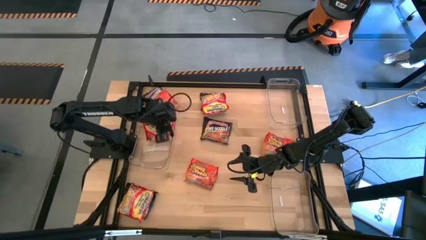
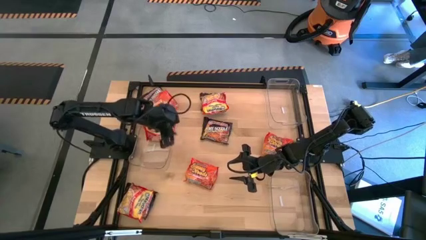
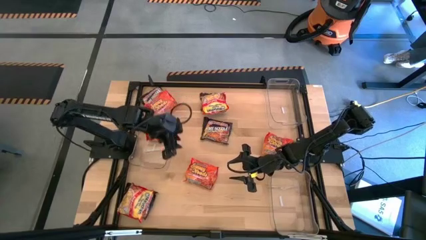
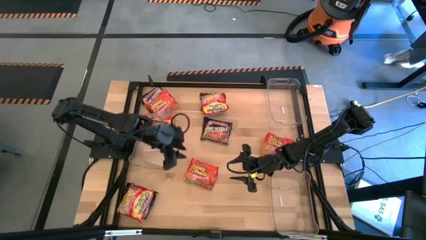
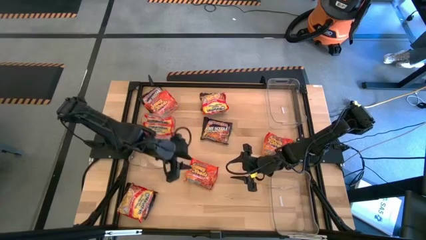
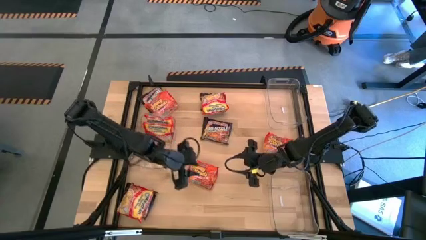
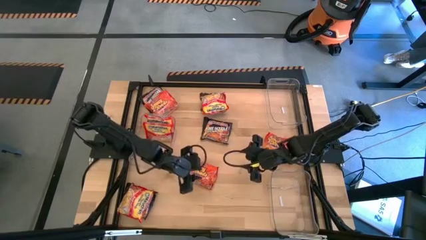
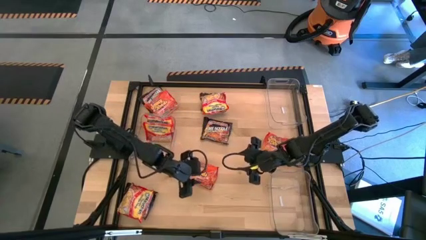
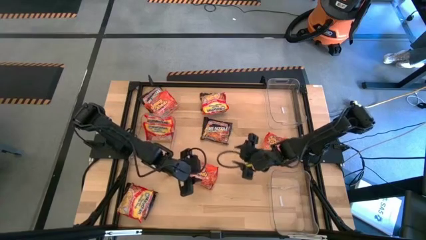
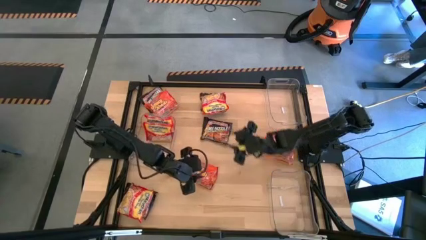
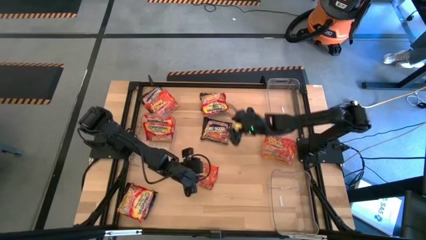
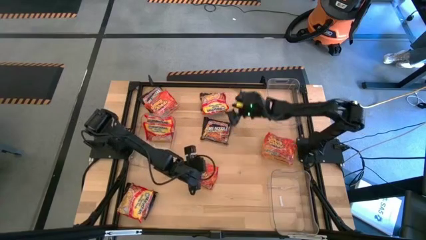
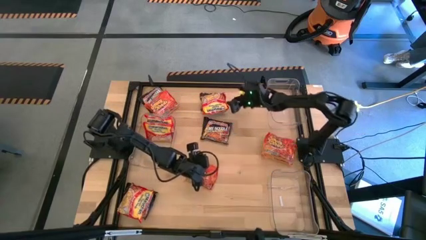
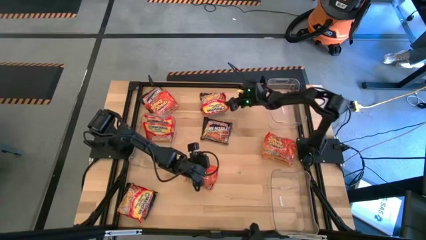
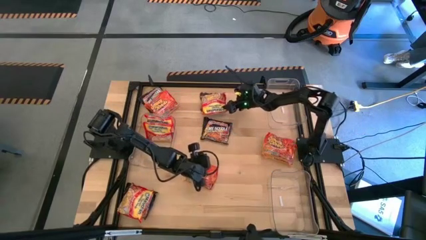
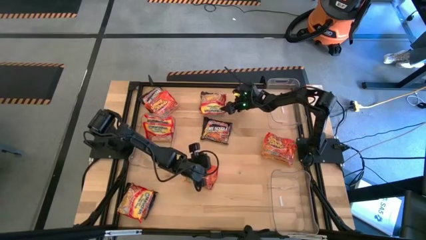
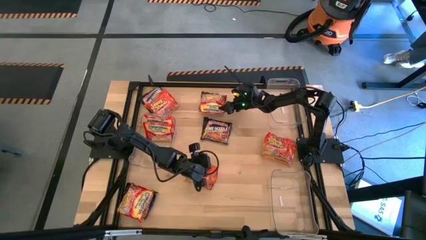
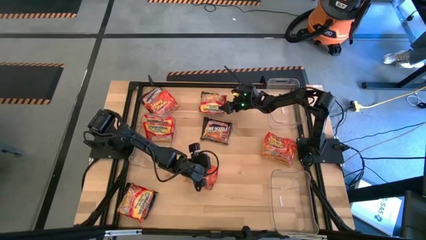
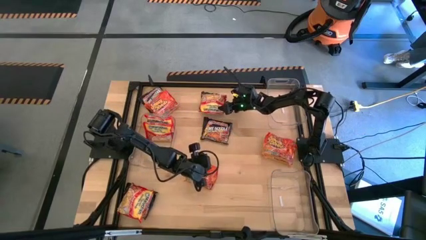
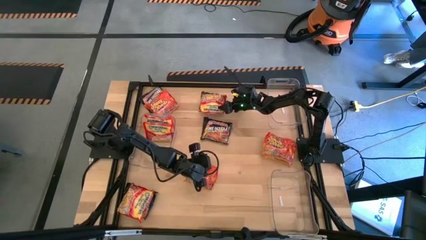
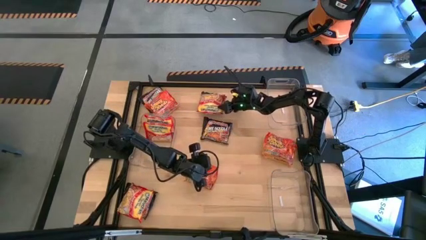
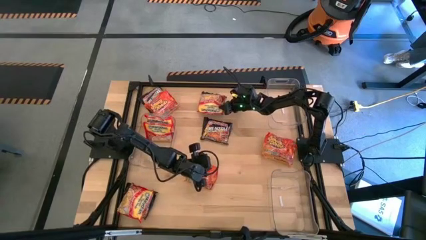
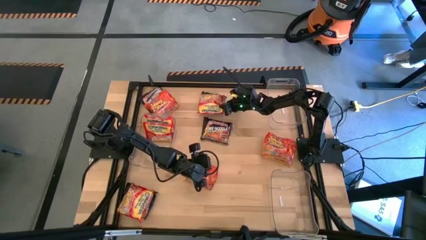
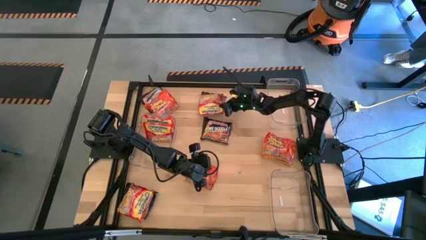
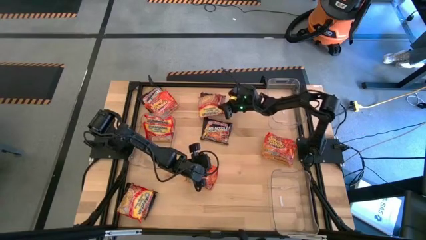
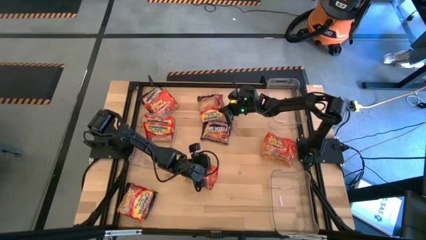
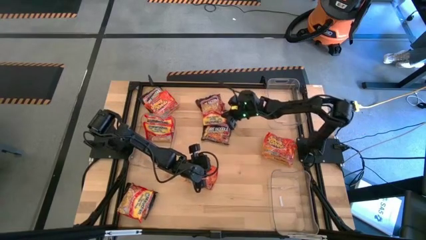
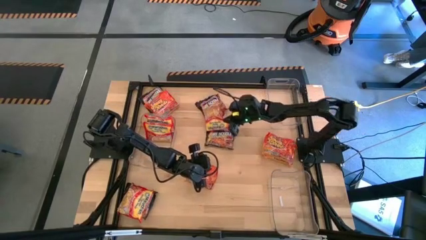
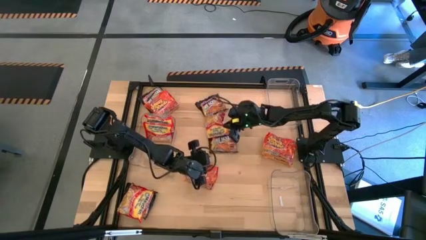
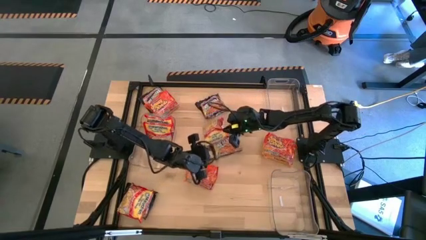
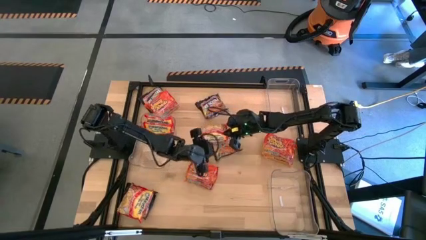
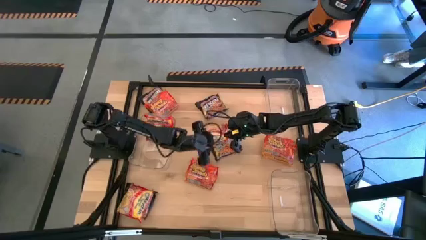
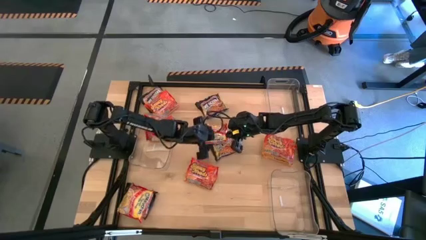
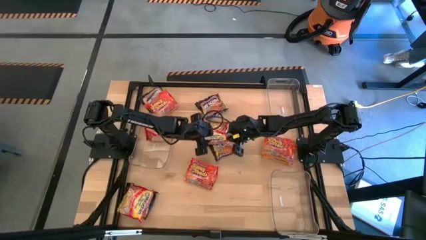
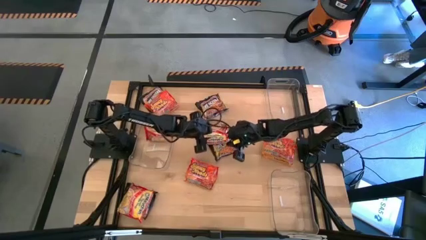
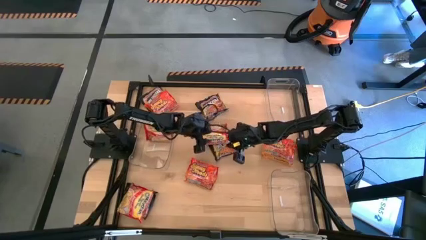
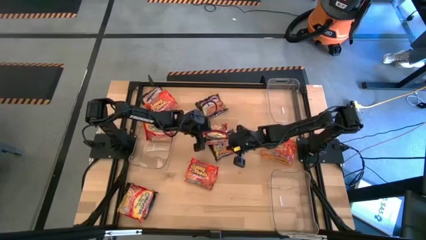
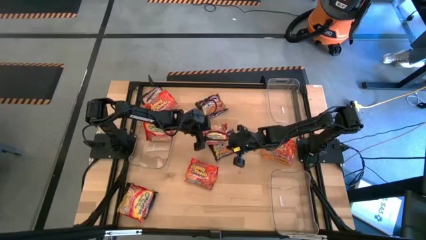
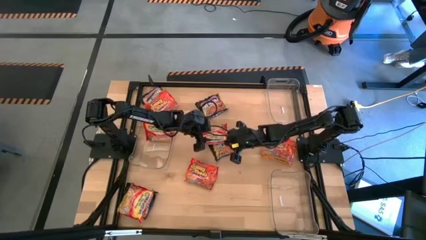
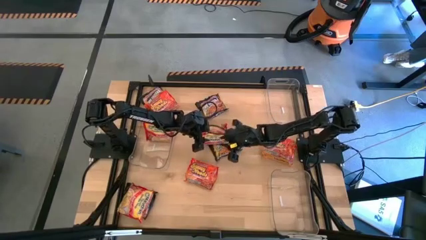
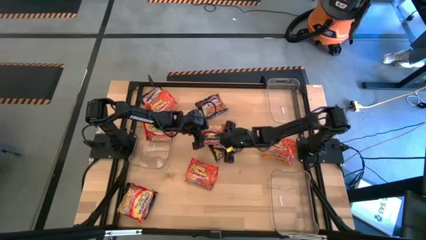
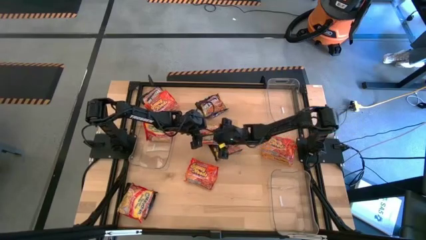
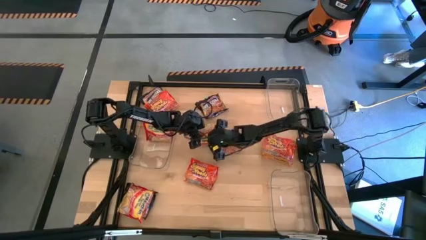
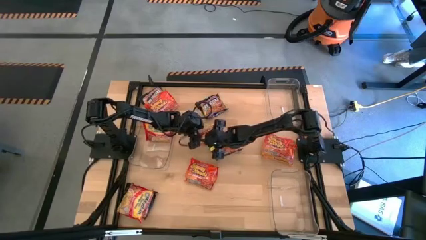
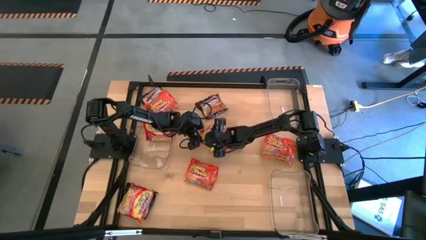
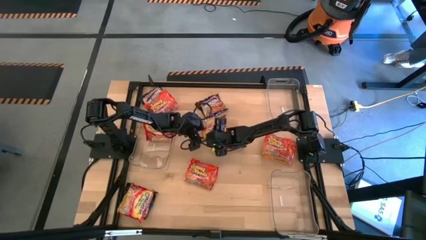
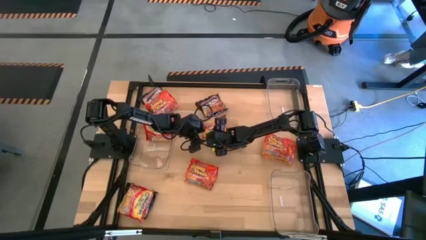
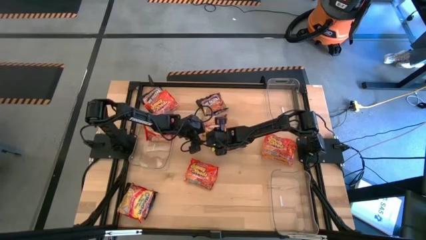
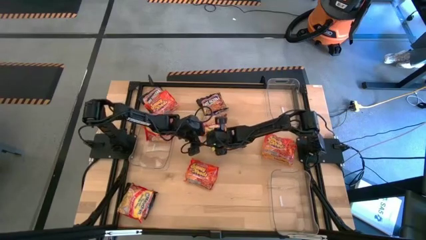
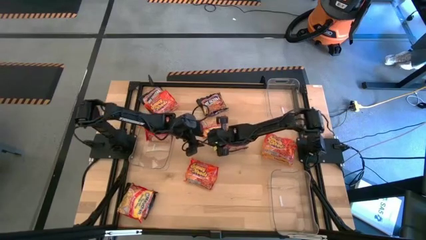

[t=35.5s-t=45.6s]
Task: Sort Maruchan noodles
Put the red noodle pack into the middle transparent bin
